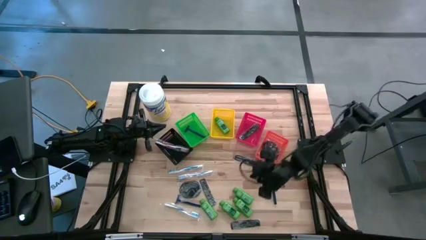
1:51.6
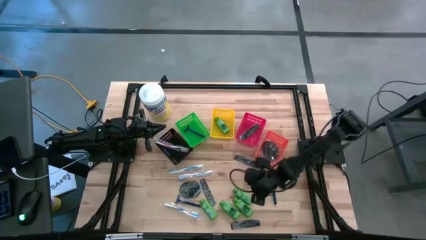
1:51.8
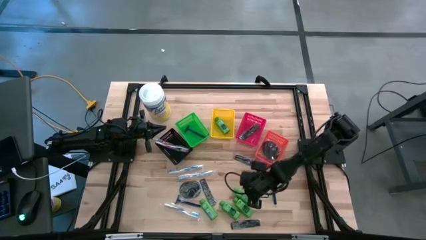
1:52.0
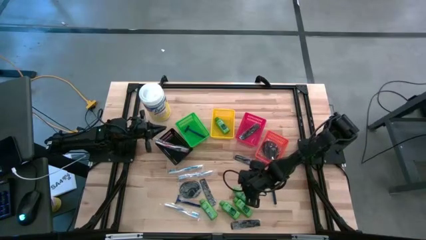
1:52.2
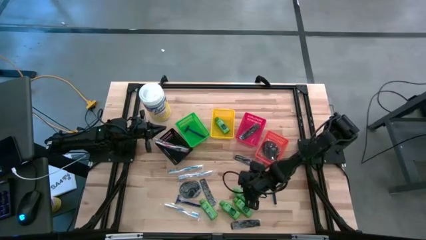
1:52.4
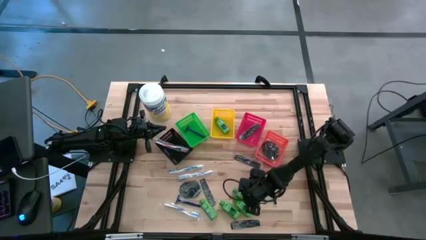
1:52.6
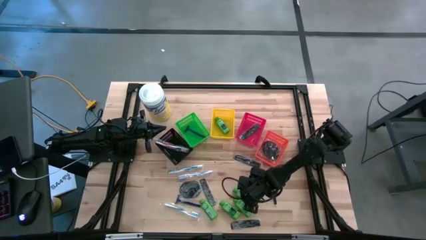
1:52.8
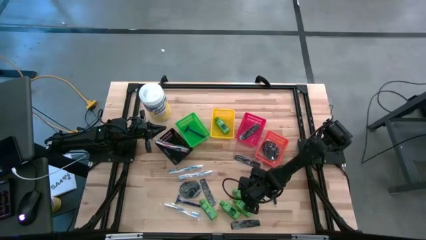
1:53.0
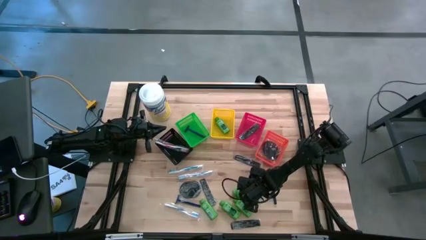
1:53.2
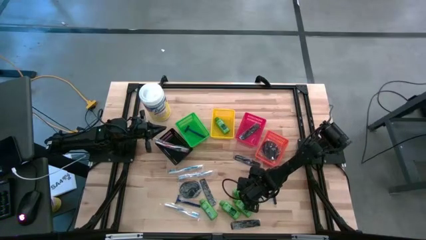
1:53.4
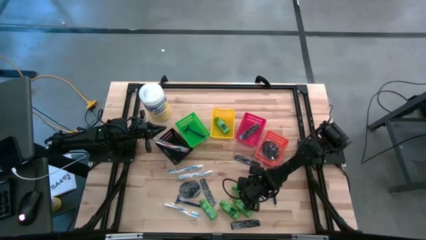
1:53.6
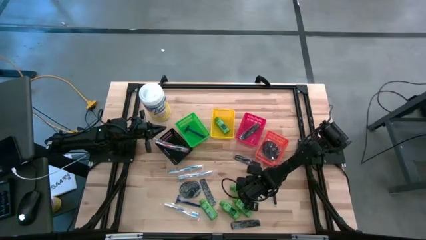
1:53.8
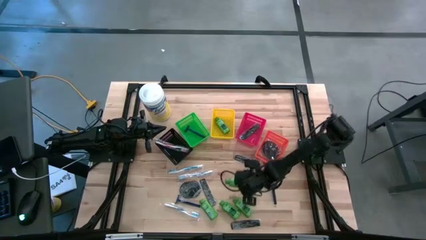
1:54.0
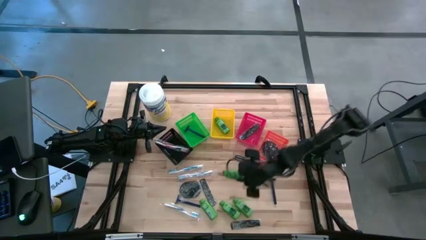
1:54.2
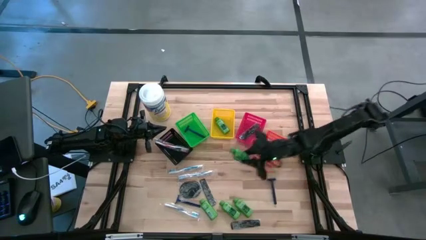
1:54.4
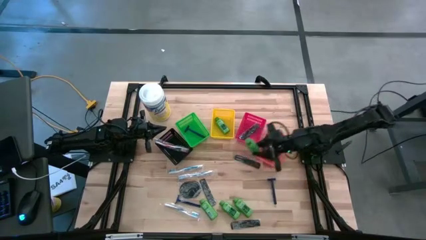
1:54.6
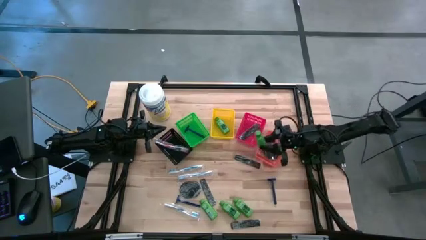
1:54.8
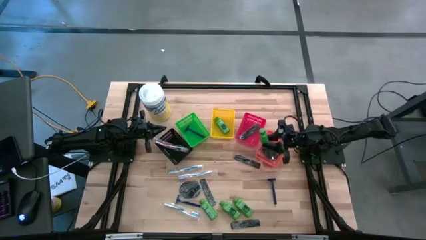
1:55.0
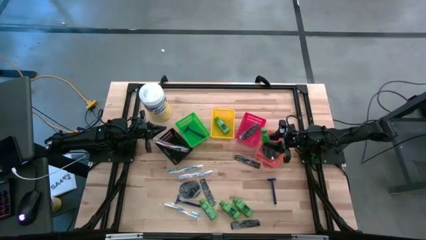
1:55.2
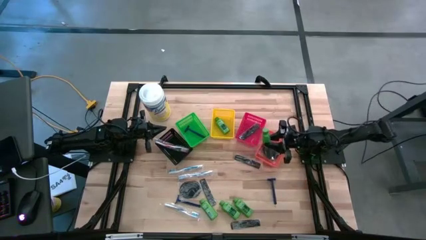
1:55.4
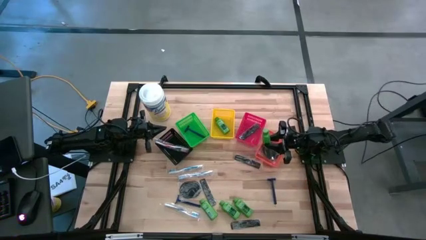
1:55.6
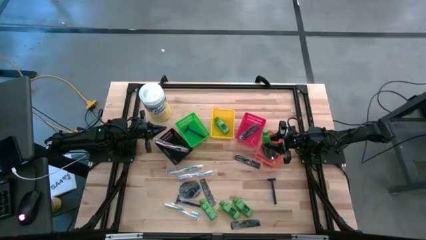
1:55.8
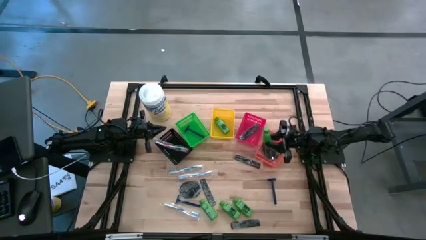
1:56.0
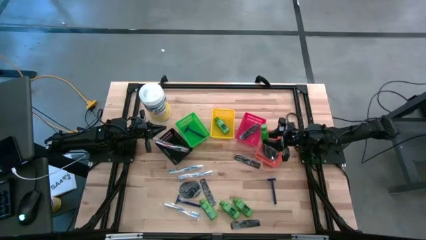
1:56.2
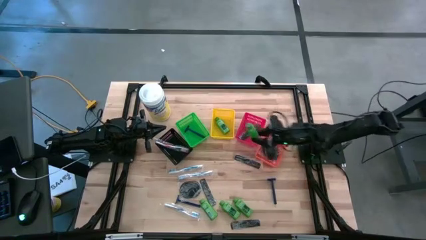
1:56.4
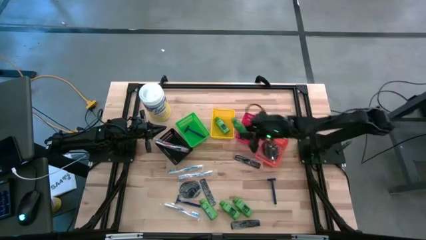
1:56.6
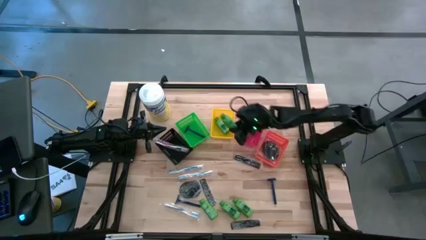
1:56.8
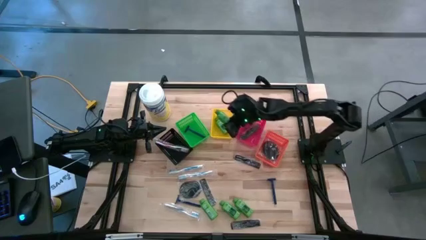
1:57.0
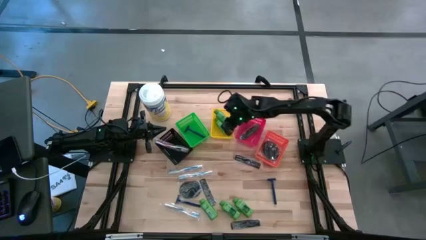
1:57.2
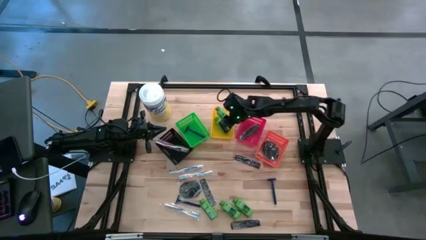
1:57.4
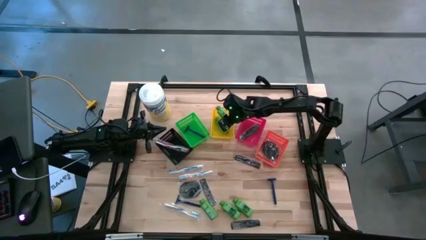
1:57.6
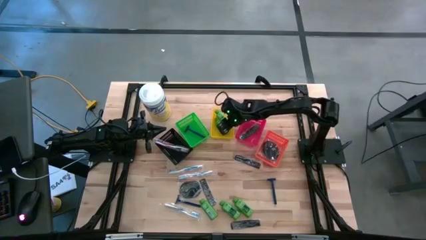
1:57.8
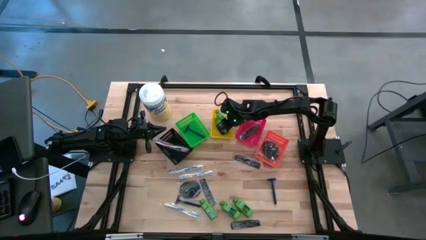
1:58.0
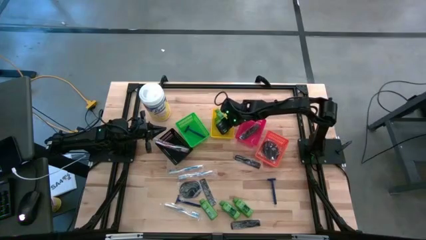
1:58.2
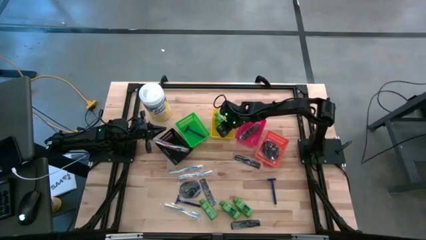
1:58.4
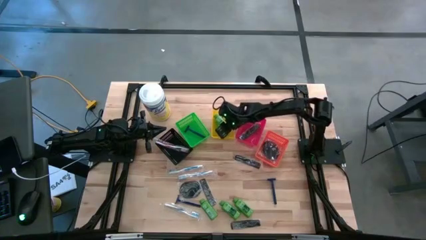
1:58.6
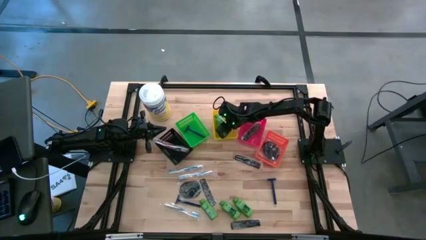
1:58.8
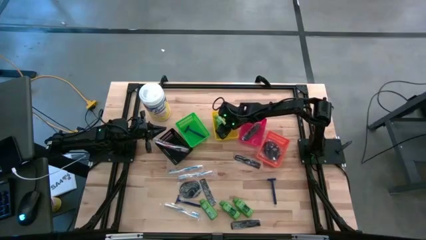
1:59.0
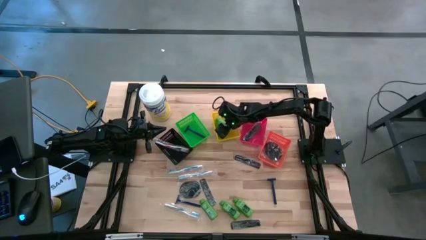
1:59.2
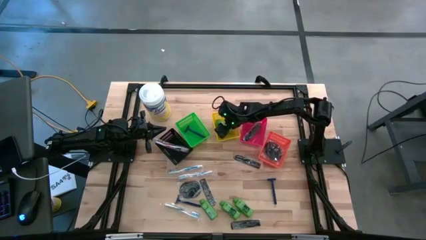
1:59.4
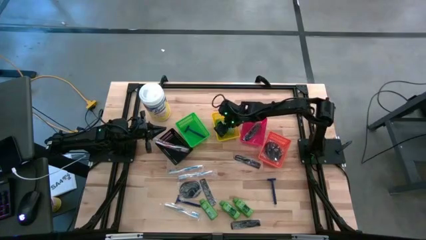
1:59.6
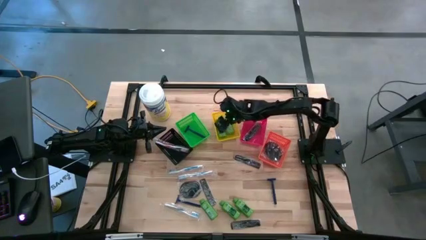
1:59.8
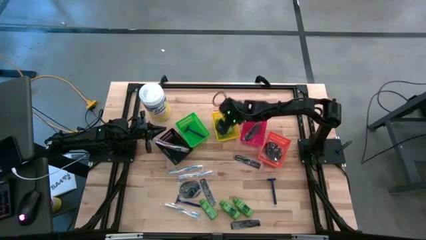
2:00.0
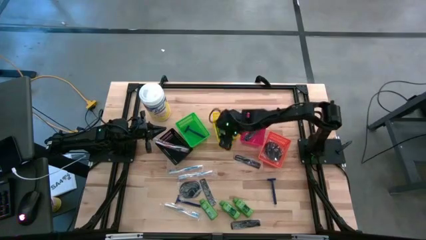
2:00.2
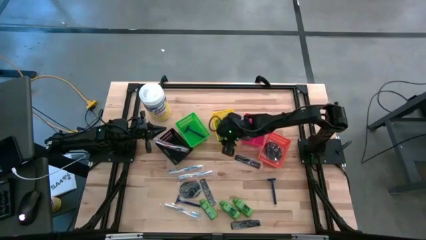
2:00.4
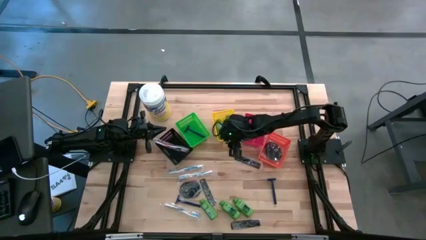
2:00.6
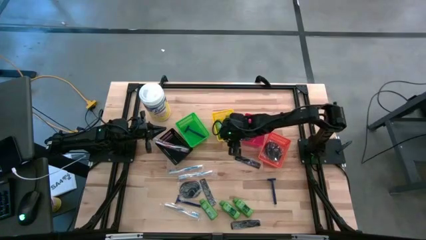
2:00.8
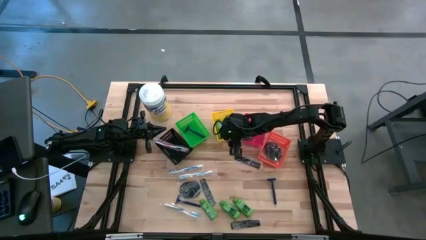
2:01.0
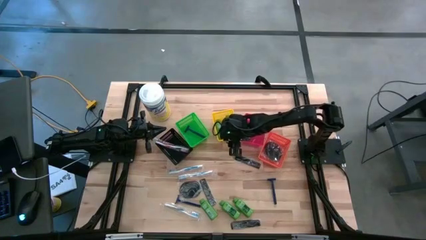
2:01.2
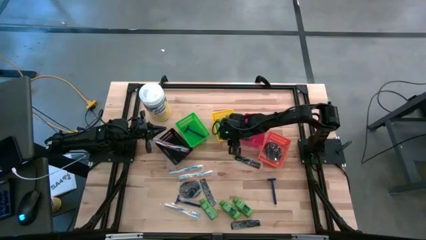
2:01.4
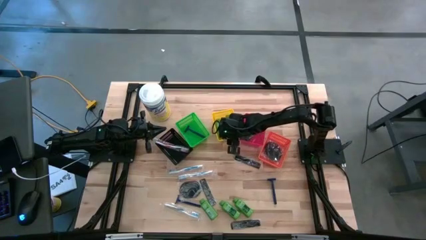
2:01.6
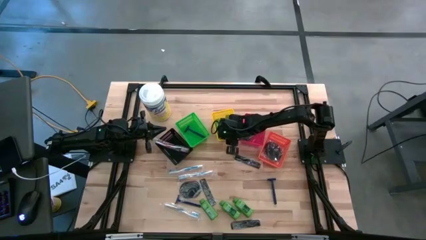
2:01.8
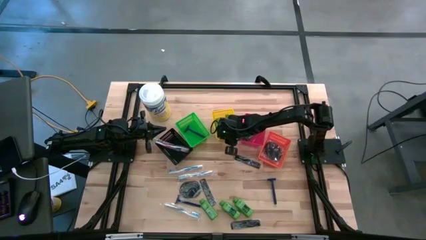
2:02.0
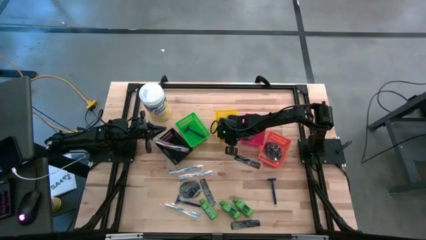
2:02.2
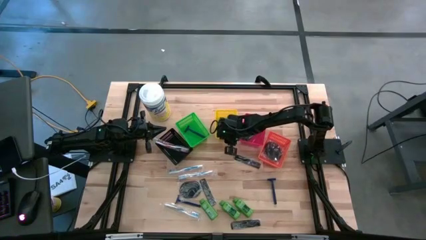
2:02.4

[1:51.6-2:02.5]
Task: Pick & Place Travel size toiletries
Put the right green bottle shampoo into the yellow bin

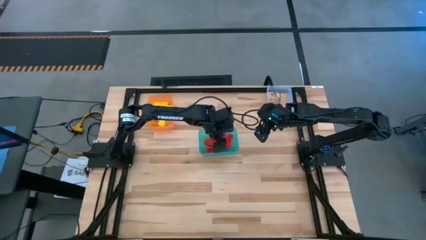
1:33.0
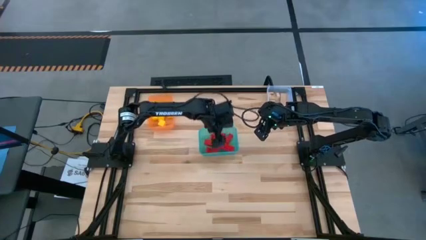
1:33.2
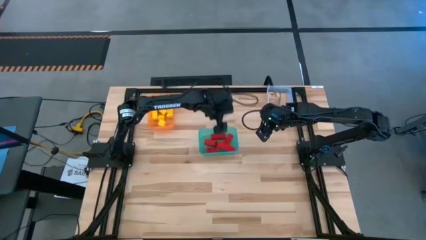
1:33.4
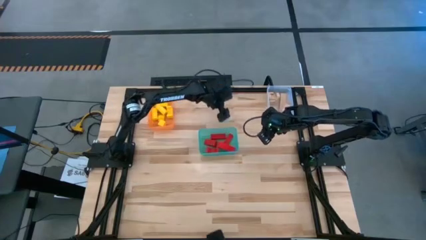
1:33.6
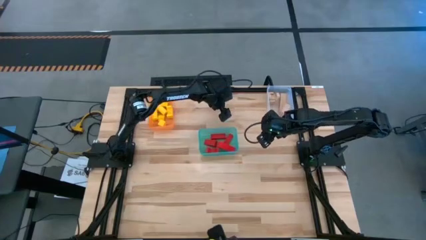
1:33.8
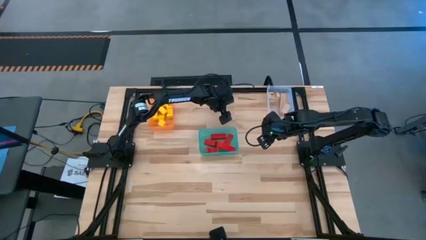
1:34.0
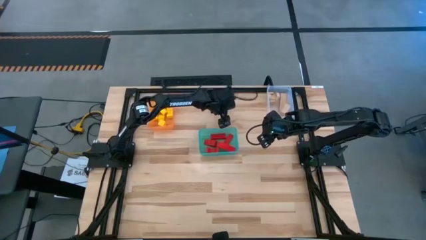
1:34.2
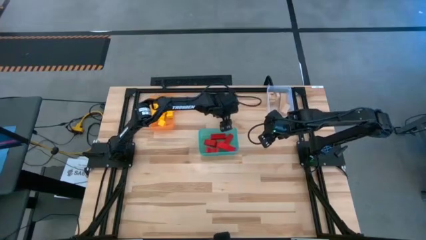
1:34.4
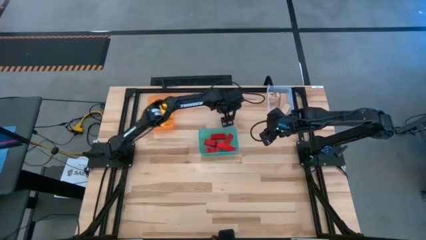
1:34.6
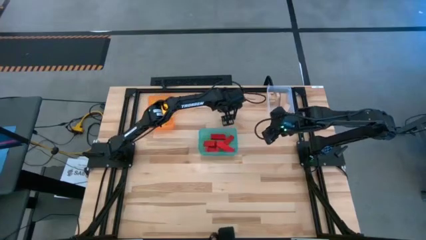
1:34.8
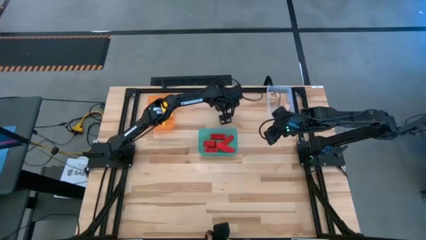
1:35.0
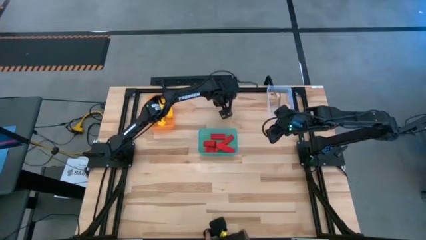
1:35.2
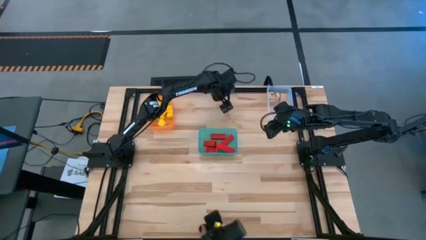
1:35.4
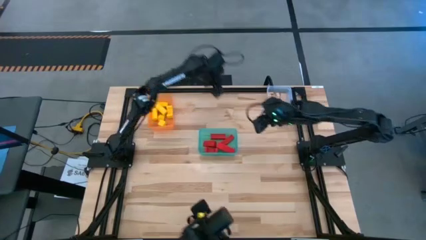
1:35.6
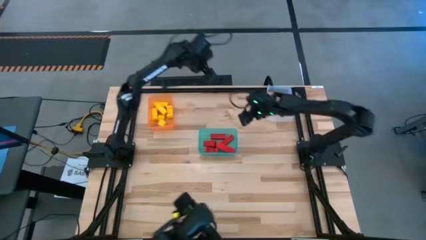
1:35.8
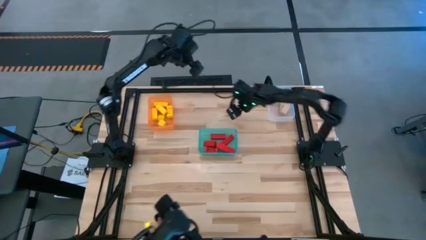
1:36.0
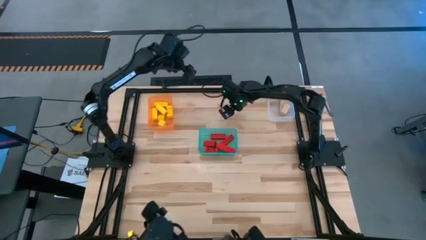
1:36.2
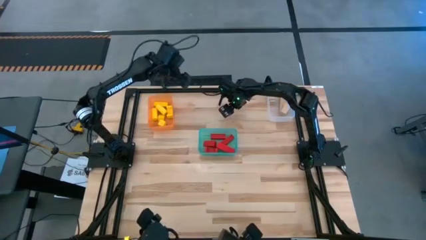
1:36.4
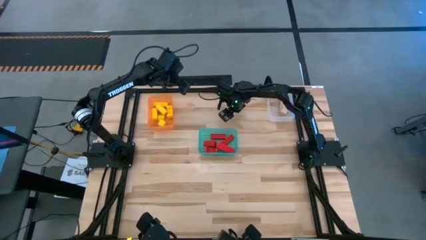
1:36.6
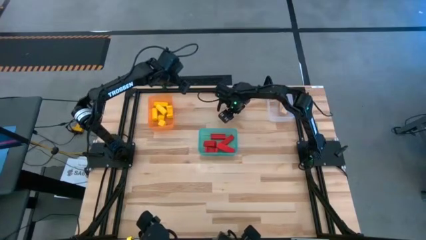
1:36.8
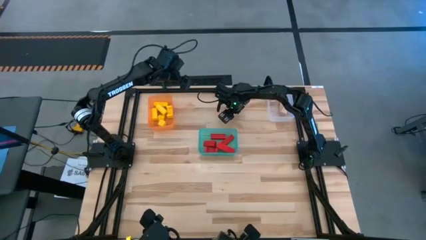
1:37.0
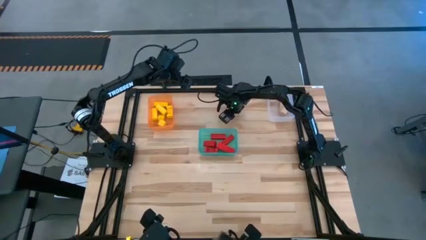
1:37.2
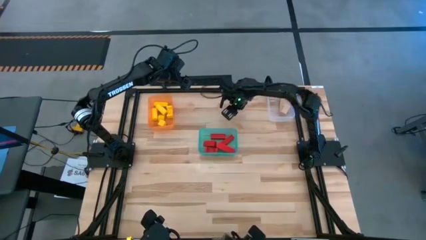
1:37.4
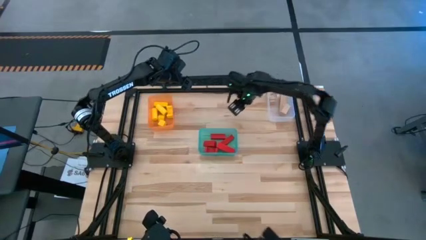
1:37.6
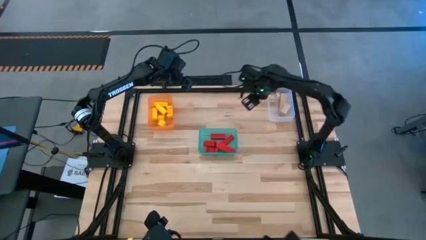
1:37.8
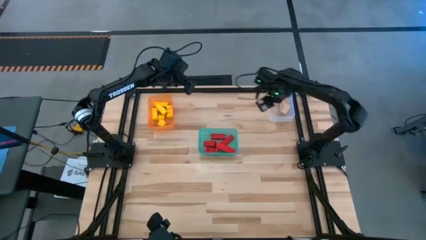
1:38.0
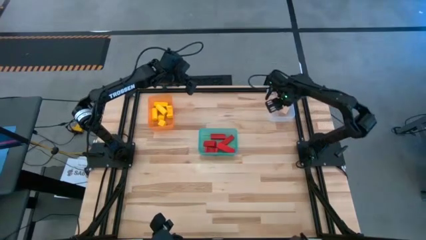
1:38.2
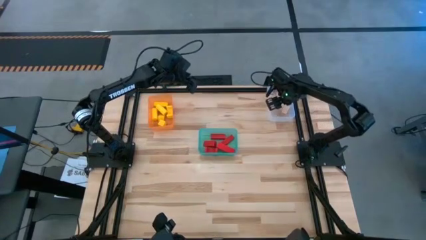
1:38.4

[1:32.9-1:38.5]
Task: Sort & place blocks by color
Put the brown block into the transparent bin
